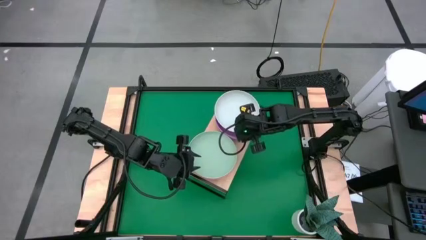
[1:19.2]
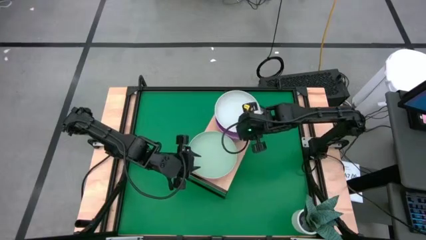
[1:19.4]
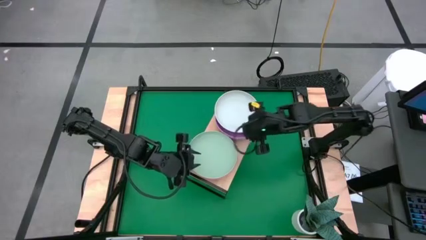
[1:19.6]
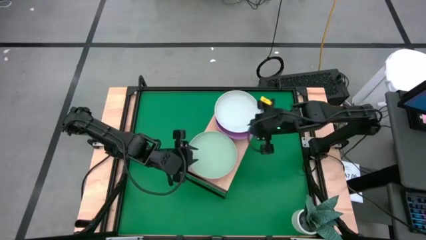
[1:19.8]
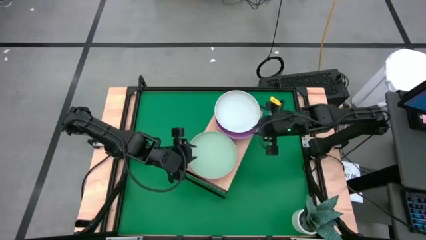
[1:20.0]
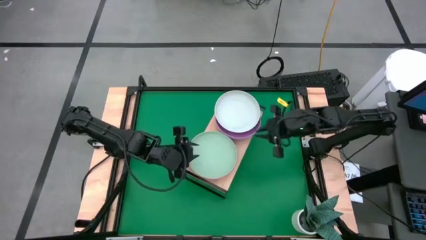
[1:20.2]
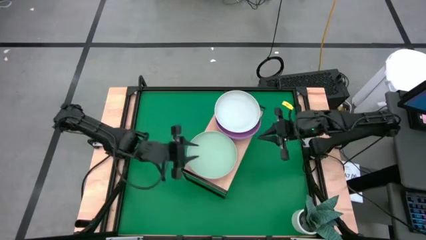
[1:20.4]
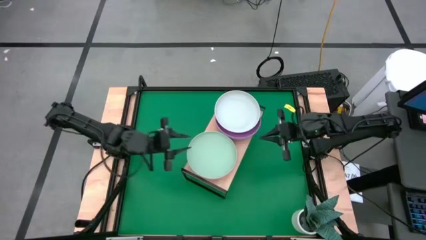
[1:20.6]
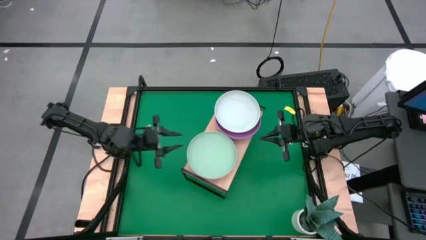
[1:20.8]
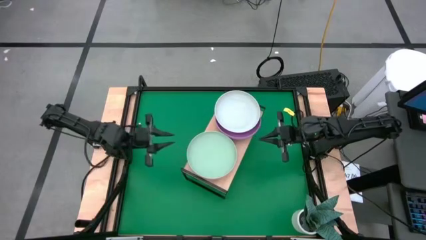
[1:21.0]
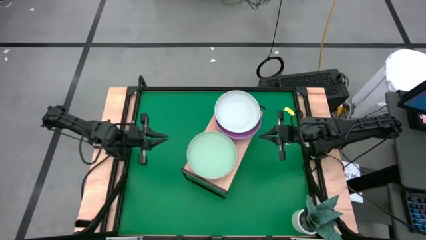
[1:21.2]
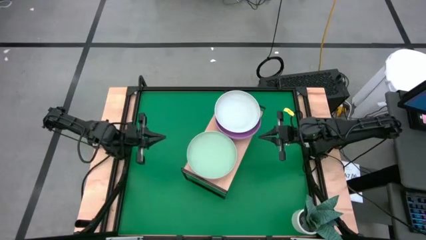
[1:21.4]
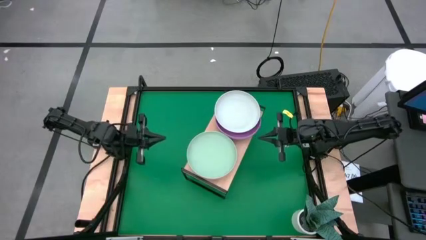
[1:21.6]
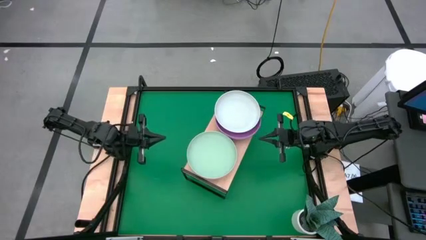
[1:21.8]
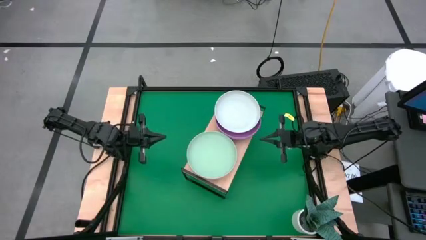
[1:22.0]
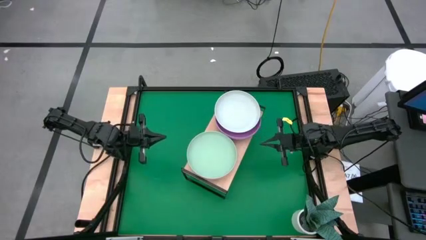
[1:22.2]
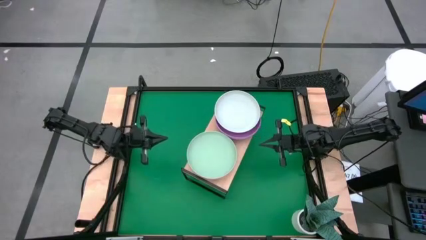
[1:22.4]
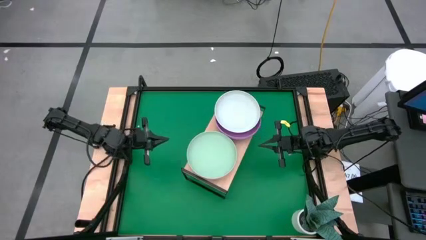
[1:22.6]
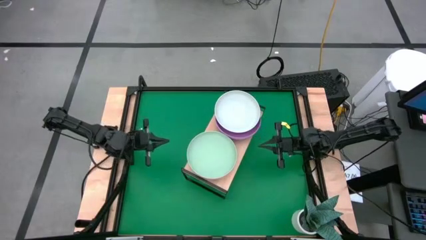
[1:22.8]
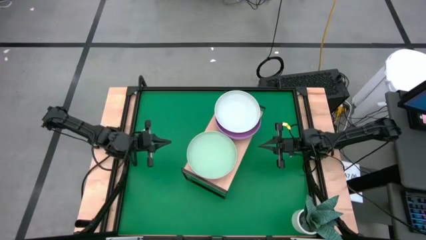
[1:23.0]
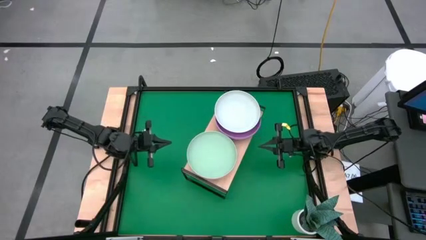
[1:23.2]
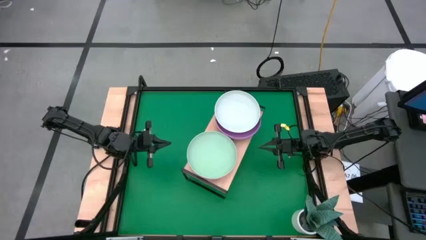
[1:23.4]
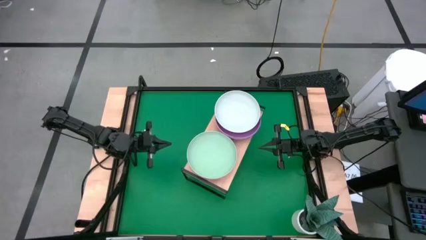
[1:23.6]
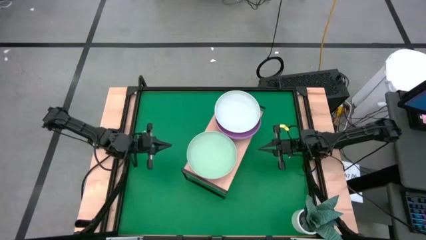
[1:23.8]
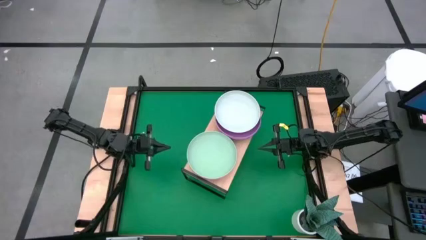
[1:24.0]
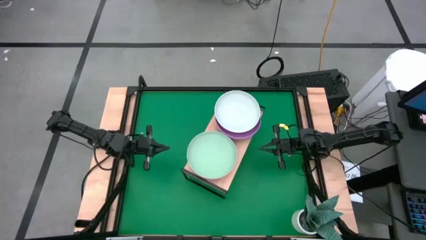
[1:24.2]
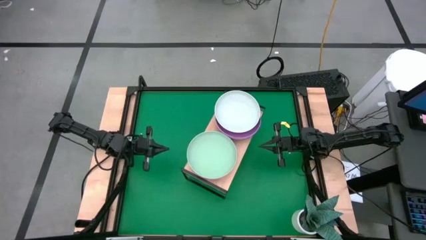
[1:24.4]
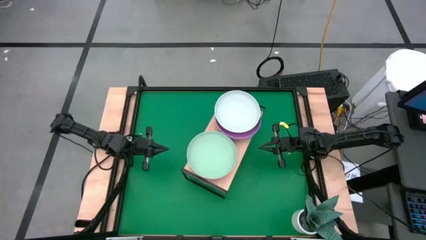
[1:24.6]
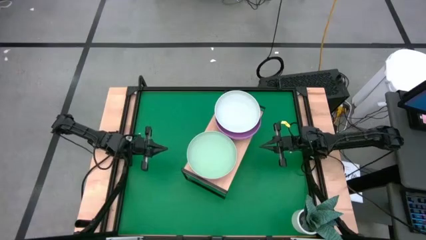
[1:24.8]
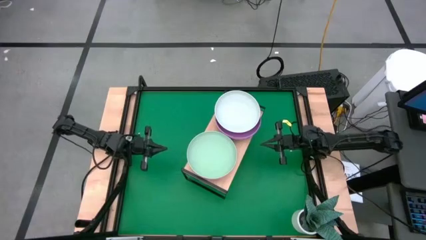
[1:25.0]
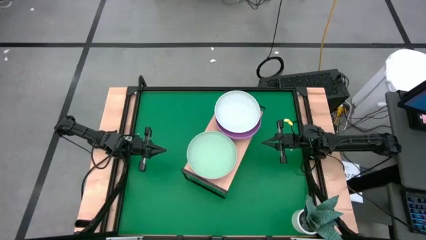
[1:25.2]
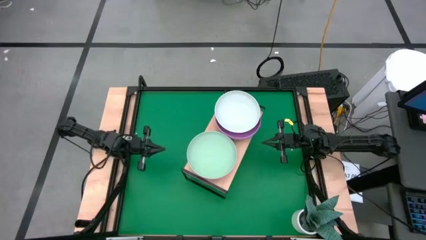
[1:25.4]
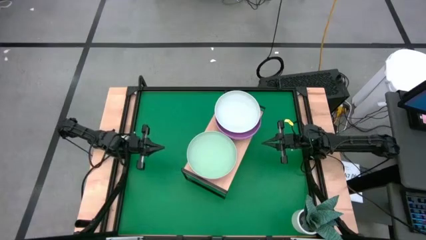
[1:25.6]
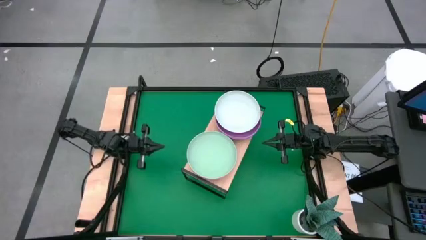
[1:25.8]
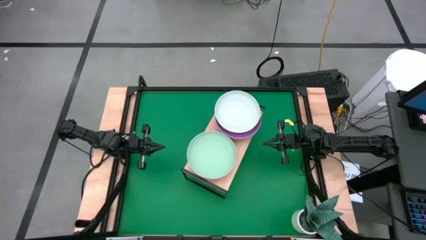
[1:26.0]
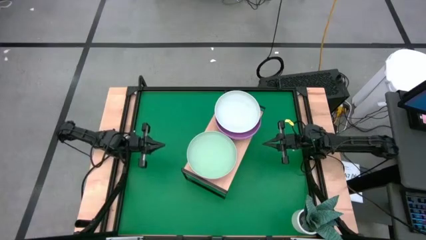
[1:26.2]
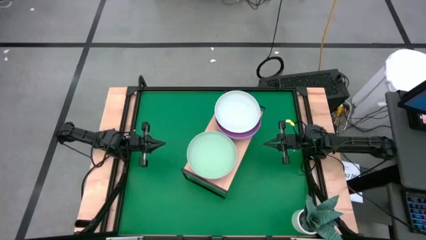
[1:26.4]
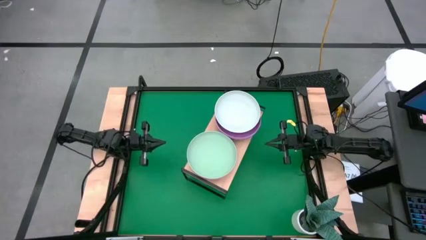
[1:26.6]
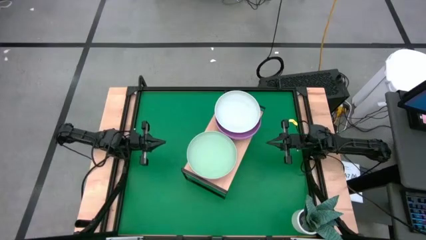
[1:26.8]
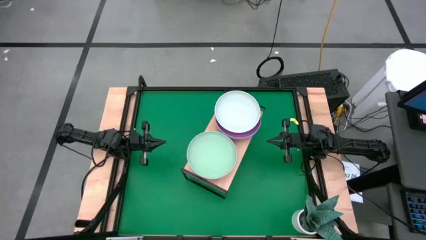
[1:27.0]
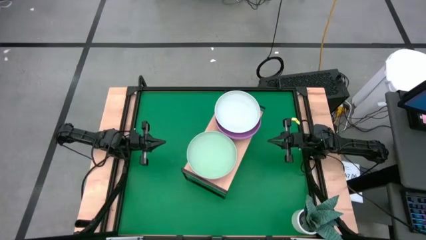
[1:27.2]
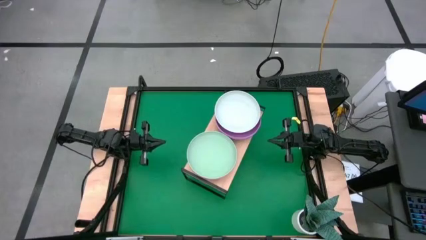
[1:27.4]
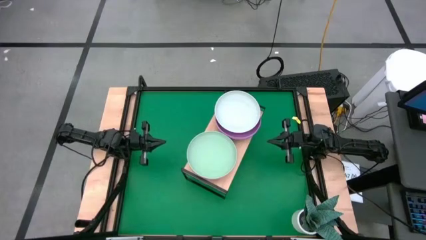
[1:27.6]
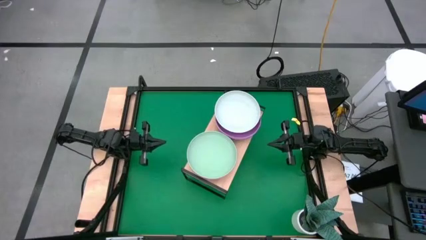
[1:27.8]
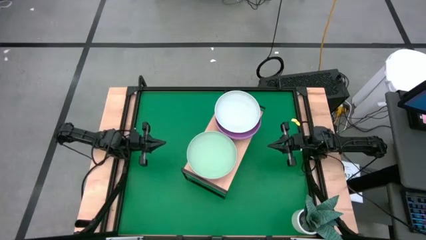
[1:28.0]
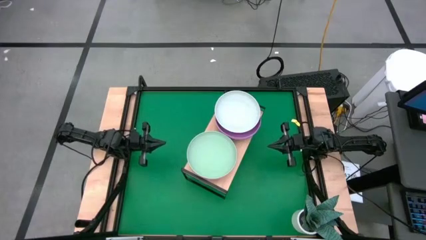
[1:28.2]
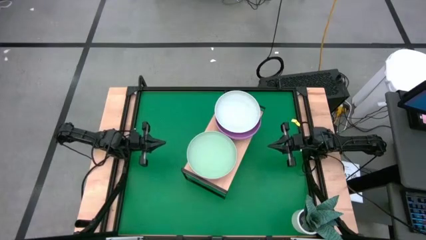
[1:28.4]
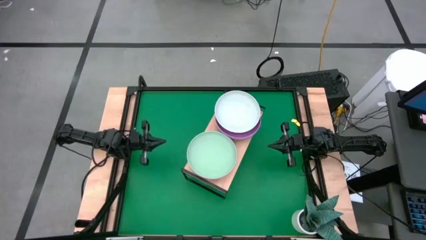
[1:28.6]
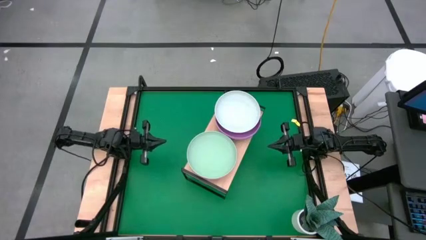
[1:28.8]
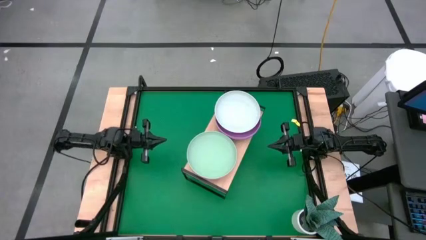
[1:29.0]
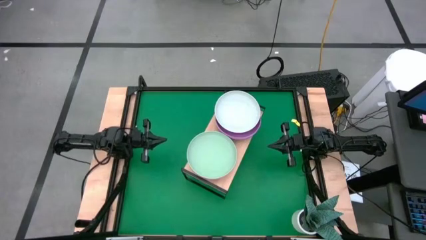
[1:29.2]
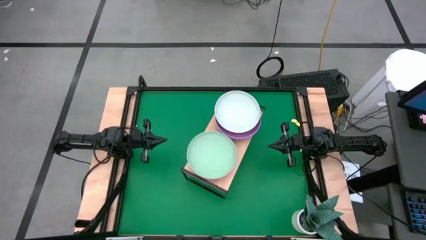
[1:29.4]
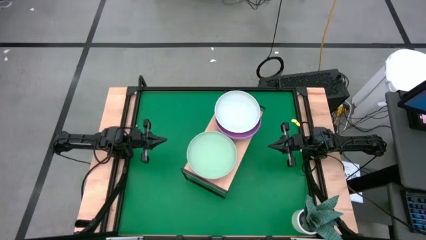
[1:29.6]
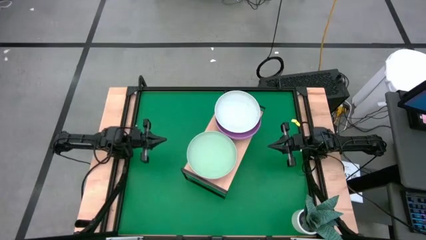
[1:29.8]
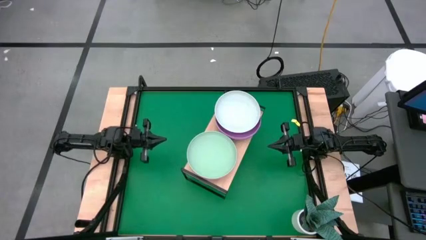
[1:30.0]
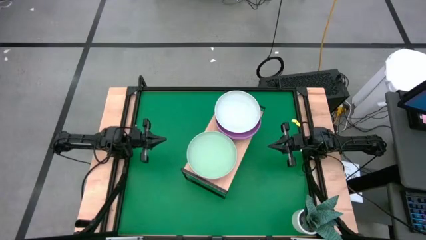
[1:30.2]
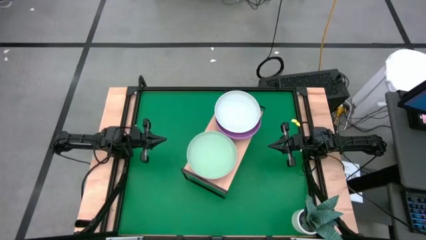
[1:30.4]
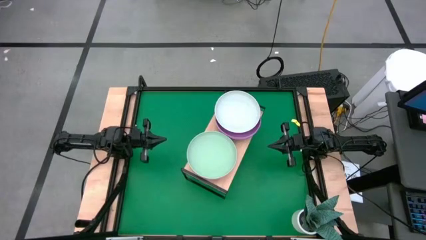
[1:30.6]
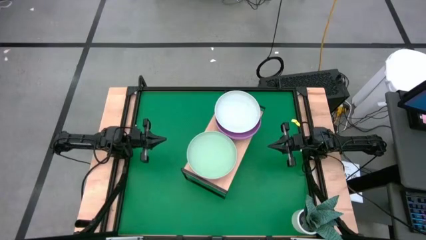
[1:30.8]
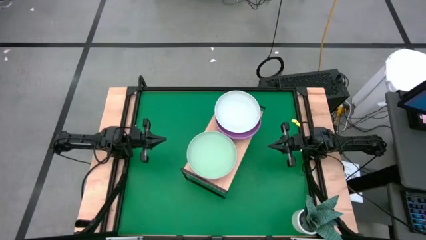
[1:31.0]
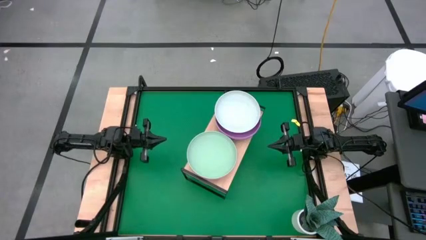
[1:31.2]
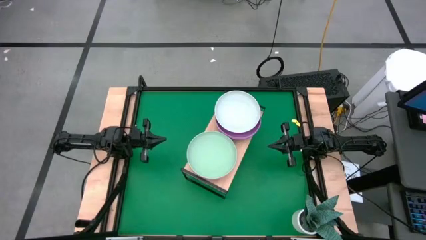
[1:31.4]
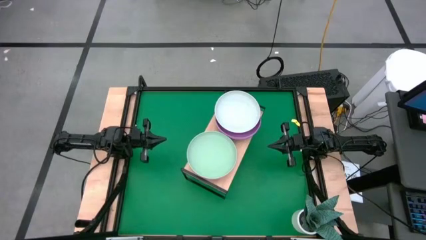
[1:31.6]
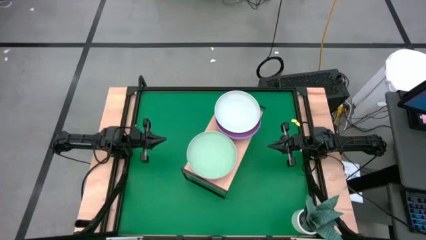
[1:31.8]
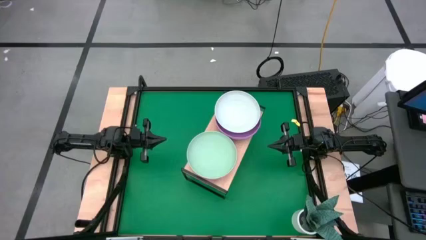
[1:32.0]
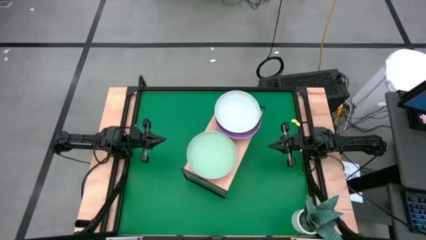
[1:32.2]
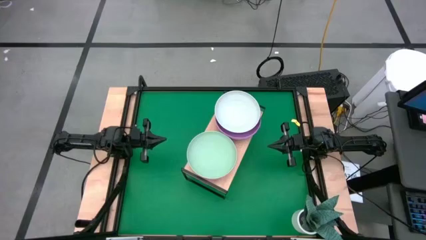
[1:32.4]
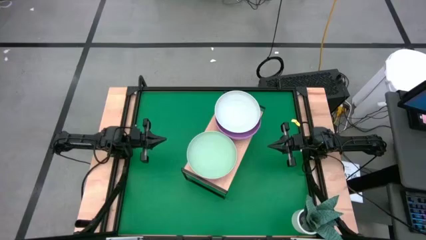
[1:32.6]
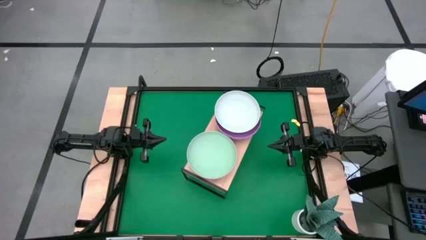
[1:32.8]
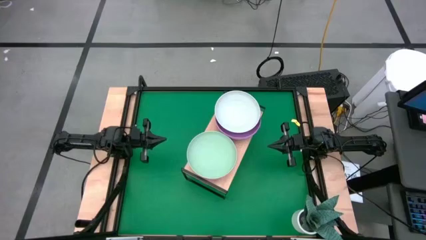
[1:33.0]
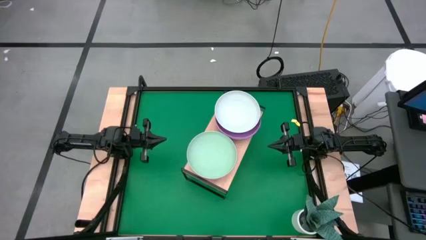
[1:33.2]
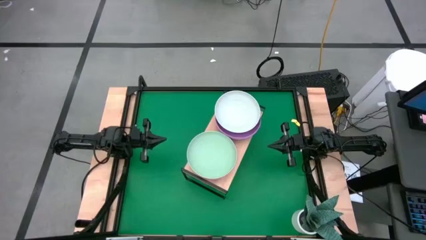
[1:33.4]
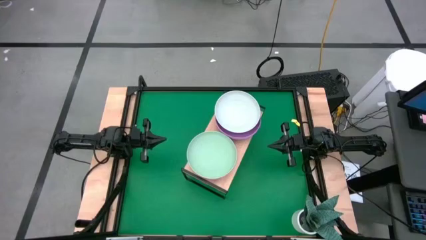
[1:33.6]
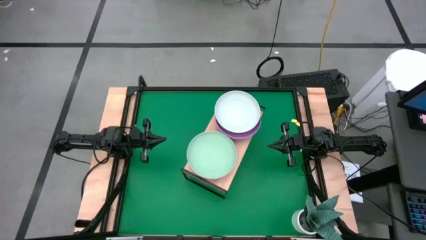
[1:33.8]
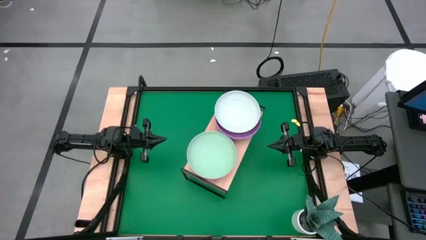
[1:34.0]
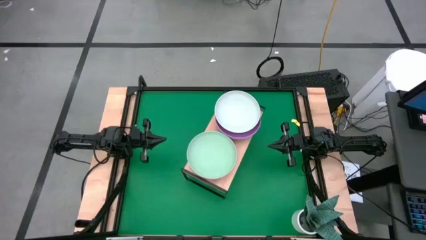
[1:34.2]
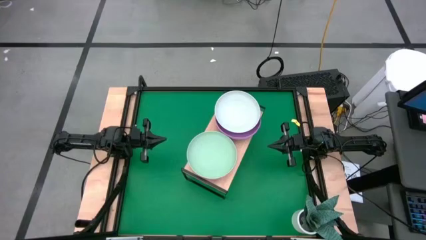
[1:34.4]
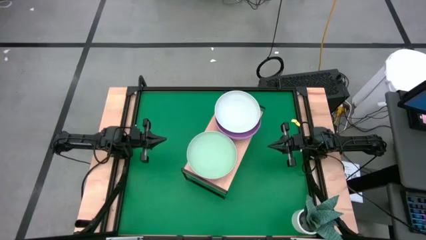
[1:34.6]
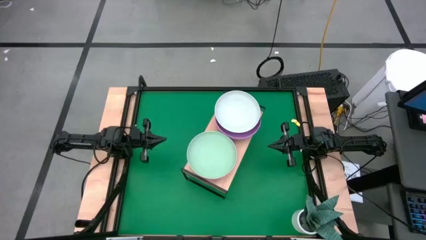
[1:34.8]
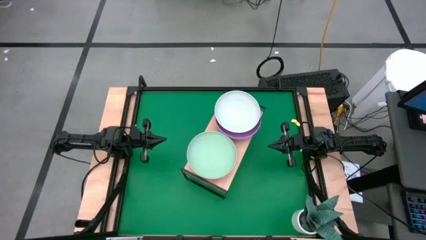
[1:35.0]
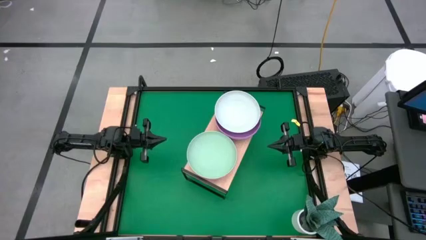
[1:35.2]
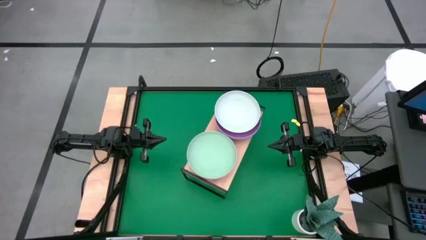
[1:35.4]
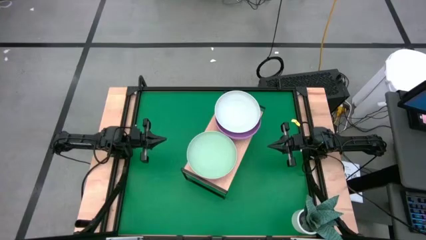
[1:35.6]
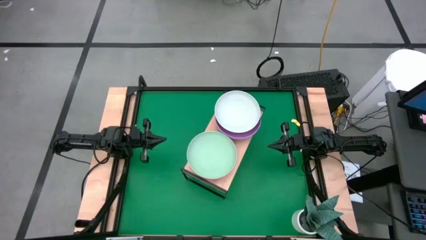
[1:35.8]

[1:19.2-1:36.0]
Task: Place and stack plates onto a shelf
Return to Home Position
